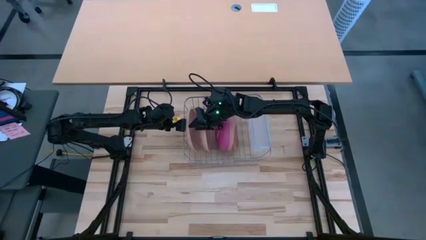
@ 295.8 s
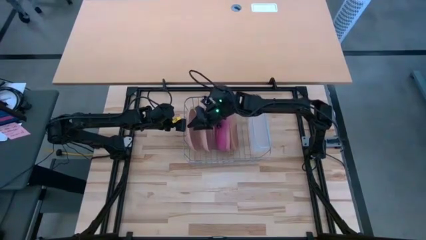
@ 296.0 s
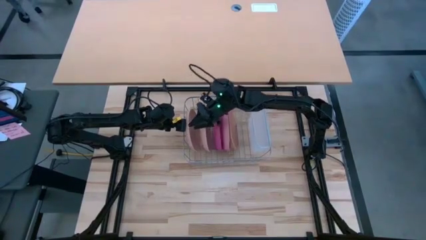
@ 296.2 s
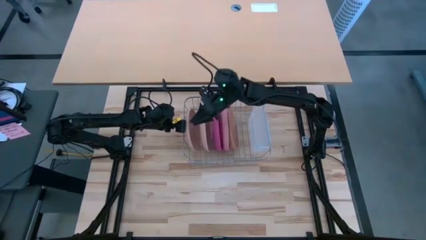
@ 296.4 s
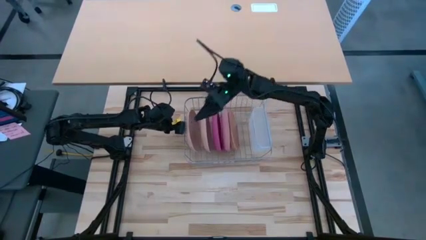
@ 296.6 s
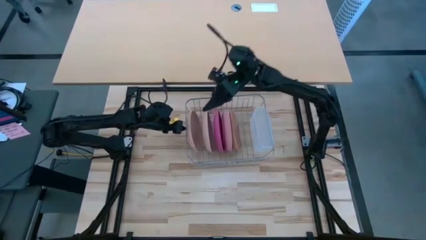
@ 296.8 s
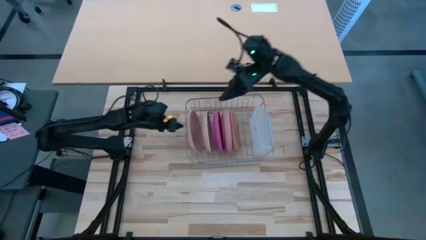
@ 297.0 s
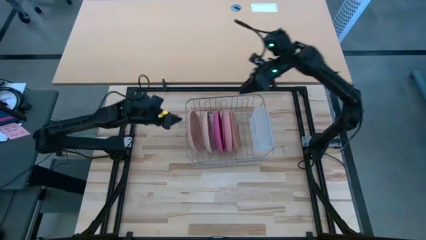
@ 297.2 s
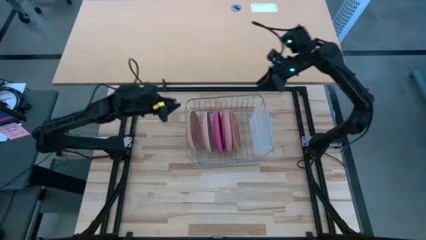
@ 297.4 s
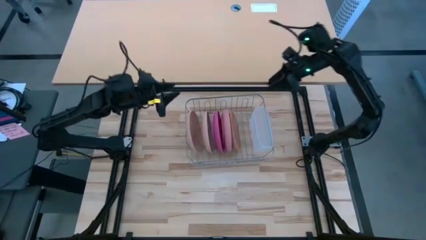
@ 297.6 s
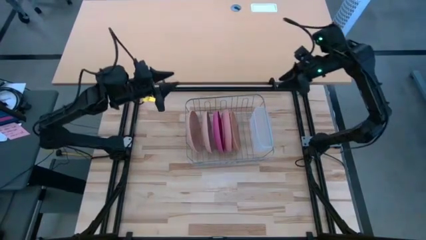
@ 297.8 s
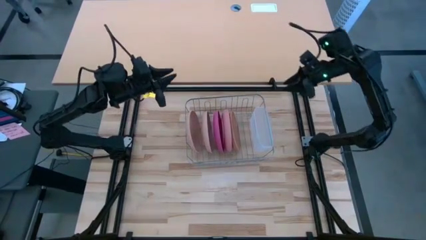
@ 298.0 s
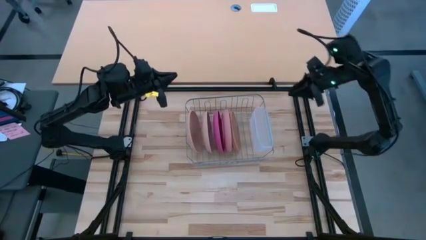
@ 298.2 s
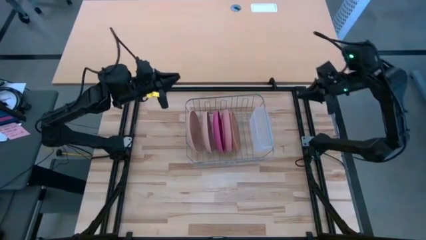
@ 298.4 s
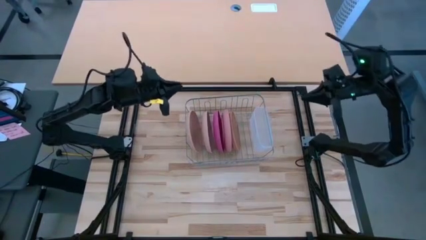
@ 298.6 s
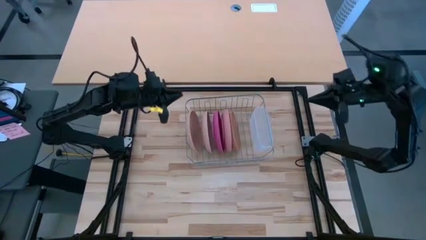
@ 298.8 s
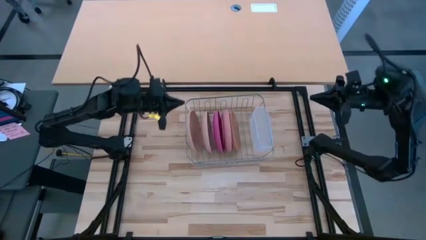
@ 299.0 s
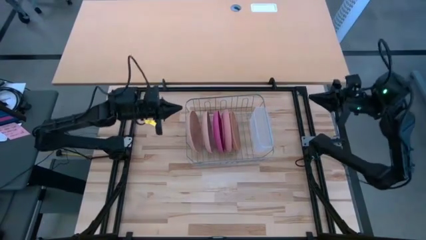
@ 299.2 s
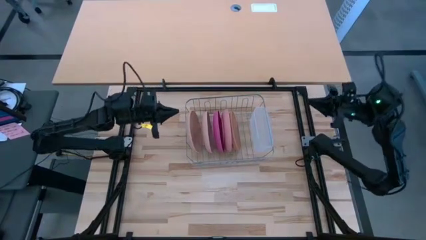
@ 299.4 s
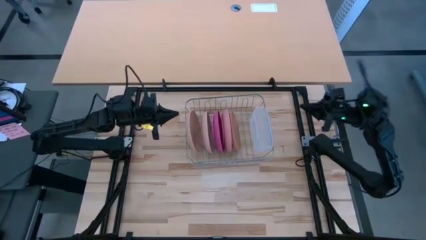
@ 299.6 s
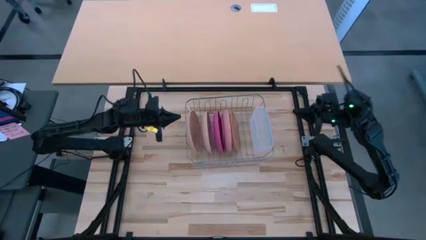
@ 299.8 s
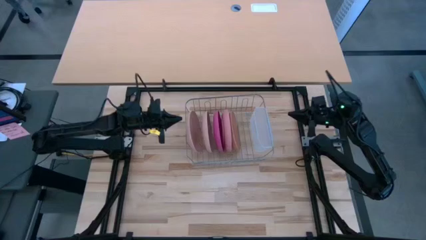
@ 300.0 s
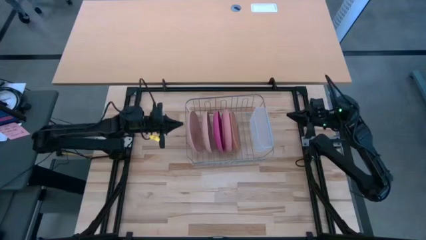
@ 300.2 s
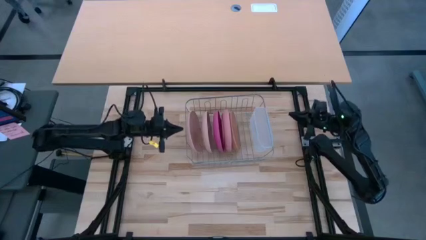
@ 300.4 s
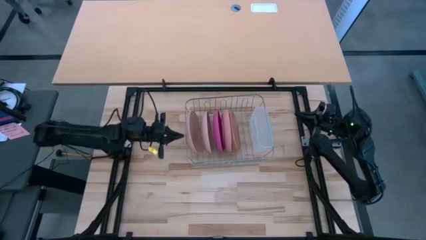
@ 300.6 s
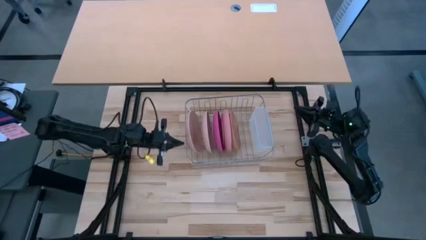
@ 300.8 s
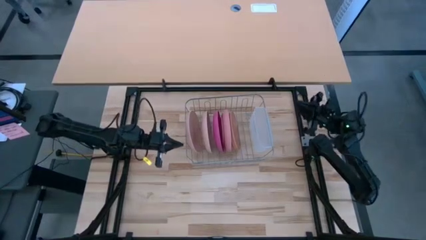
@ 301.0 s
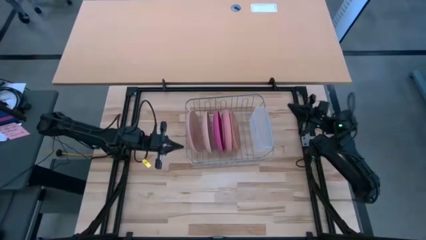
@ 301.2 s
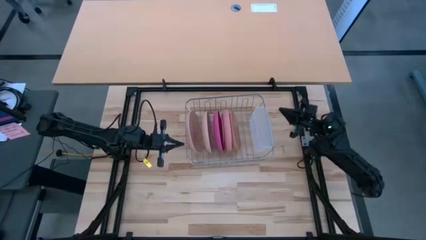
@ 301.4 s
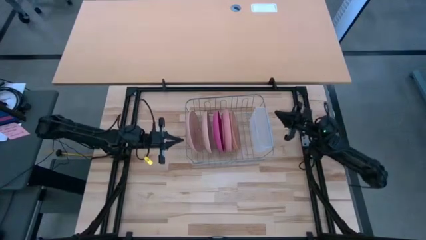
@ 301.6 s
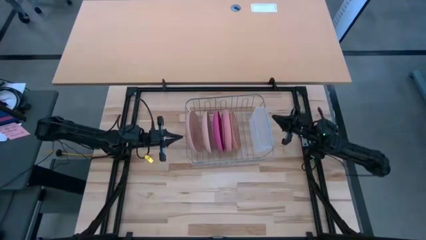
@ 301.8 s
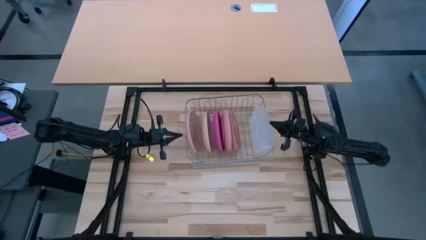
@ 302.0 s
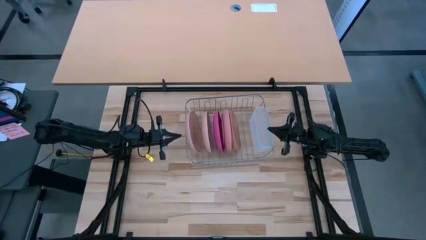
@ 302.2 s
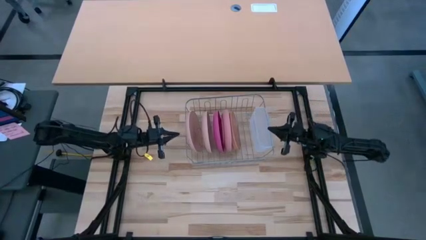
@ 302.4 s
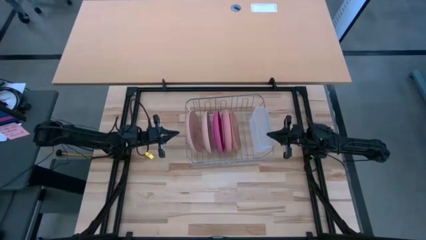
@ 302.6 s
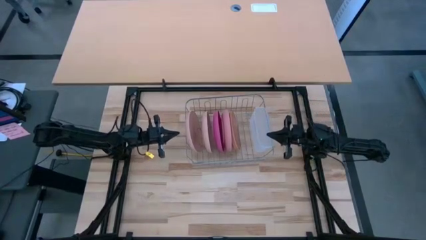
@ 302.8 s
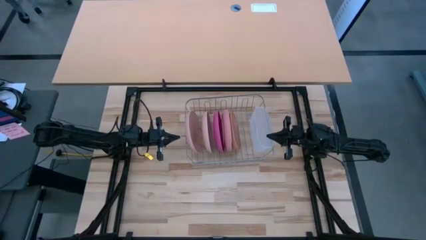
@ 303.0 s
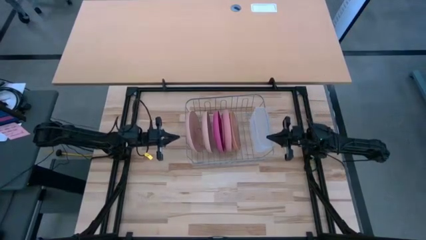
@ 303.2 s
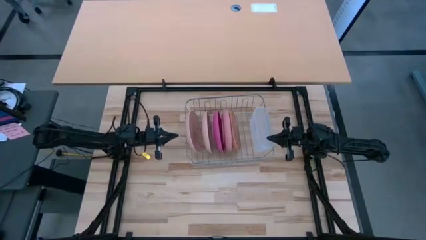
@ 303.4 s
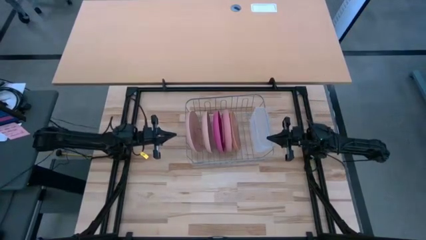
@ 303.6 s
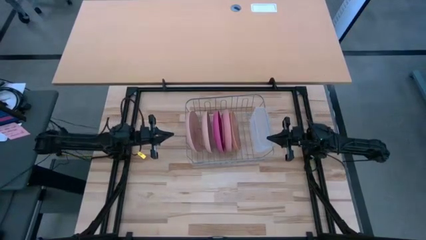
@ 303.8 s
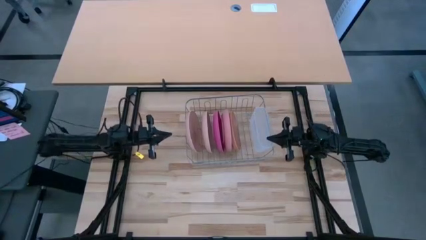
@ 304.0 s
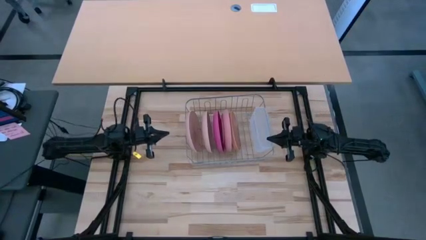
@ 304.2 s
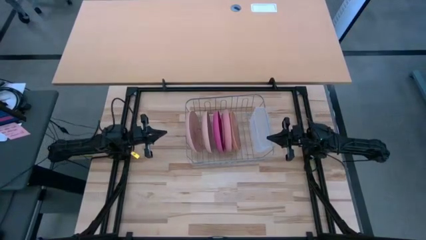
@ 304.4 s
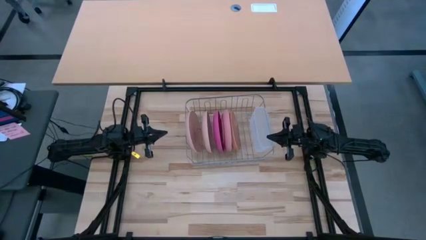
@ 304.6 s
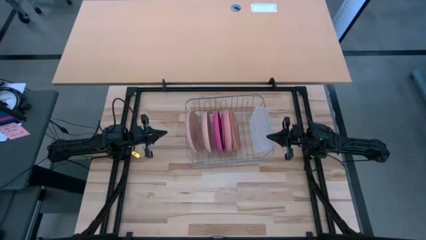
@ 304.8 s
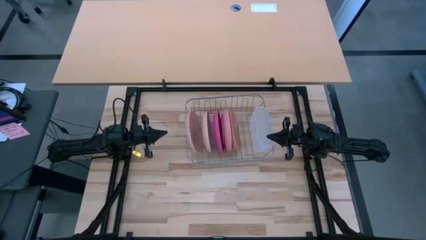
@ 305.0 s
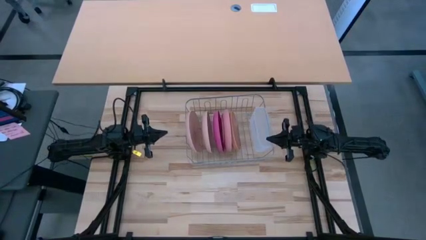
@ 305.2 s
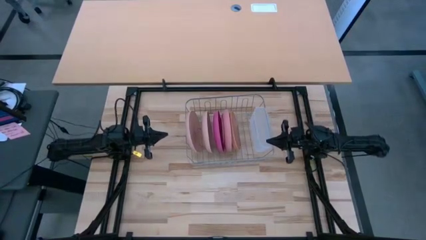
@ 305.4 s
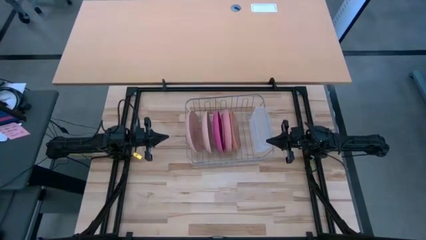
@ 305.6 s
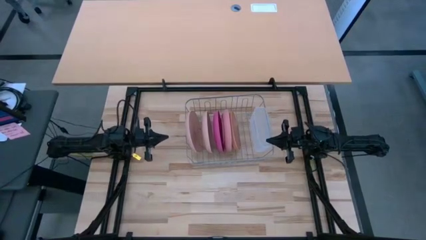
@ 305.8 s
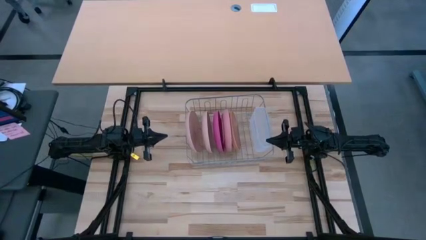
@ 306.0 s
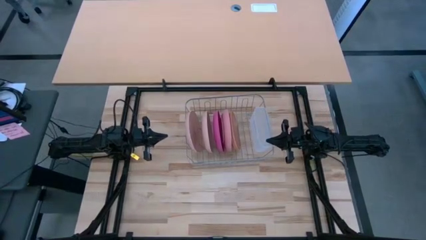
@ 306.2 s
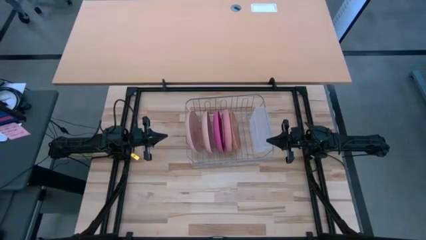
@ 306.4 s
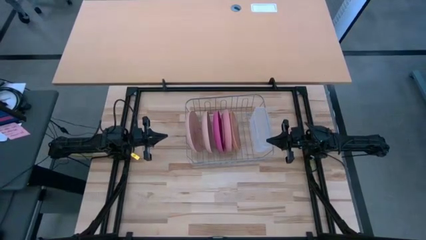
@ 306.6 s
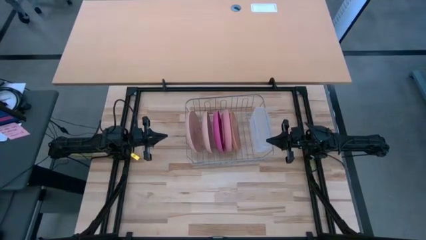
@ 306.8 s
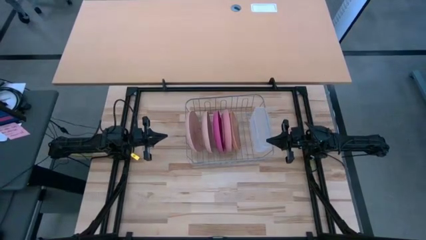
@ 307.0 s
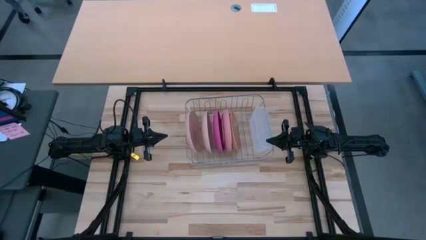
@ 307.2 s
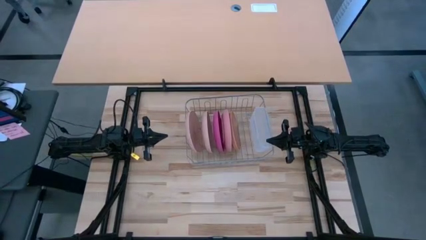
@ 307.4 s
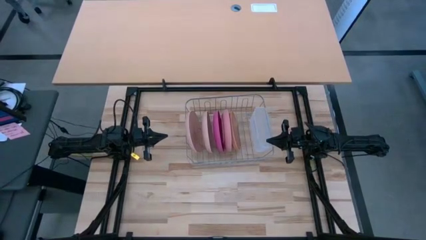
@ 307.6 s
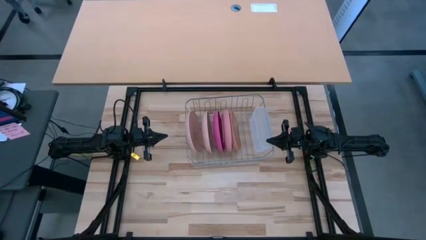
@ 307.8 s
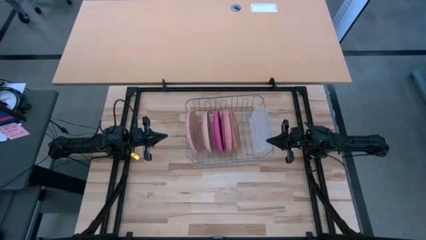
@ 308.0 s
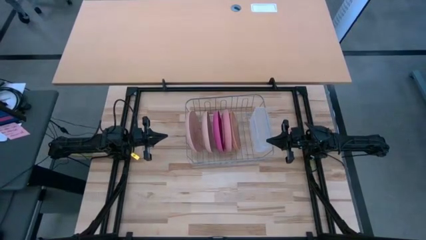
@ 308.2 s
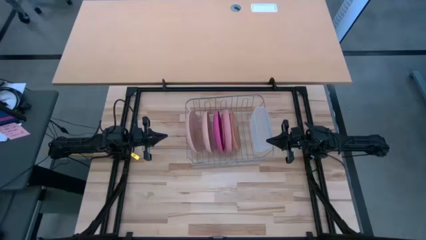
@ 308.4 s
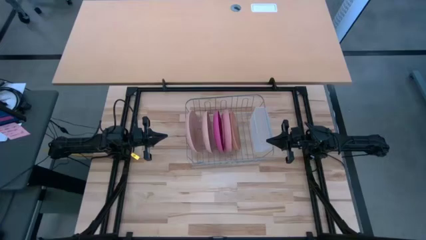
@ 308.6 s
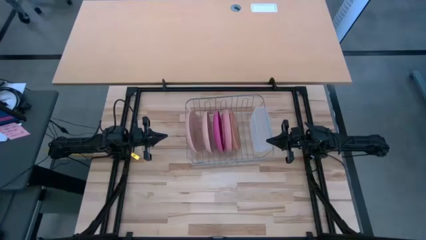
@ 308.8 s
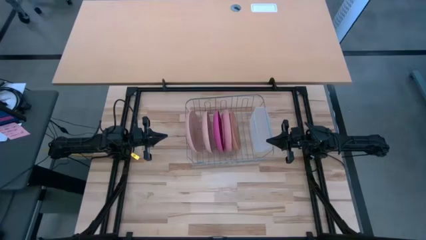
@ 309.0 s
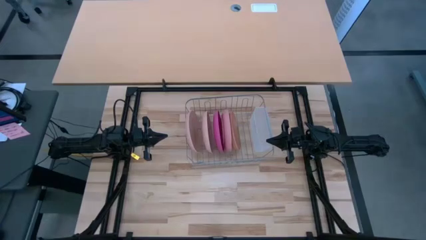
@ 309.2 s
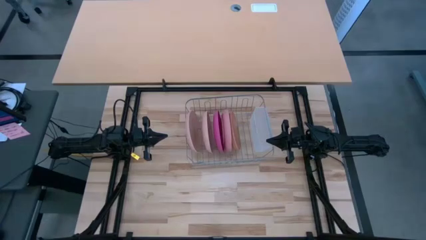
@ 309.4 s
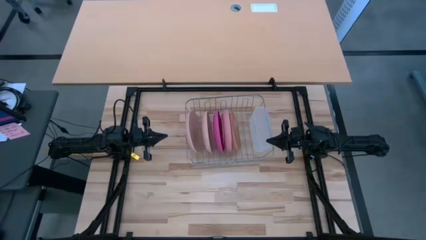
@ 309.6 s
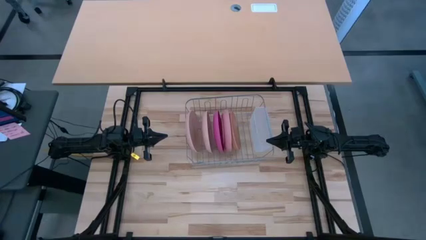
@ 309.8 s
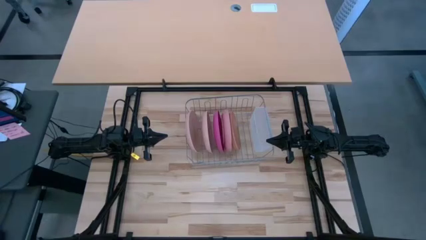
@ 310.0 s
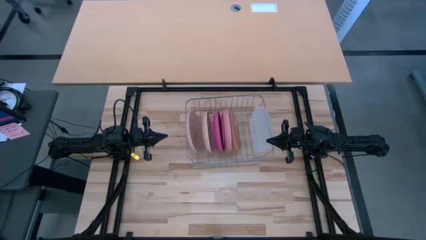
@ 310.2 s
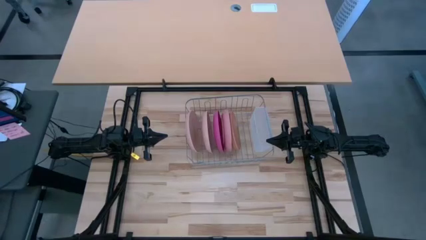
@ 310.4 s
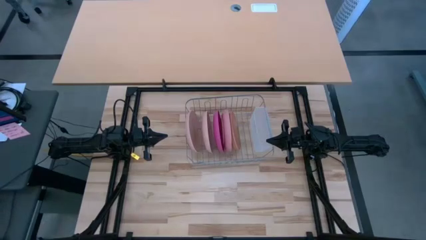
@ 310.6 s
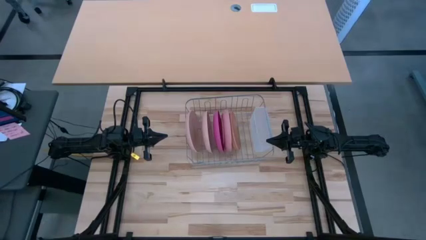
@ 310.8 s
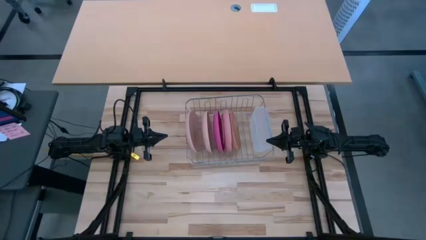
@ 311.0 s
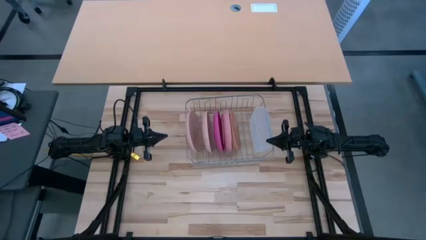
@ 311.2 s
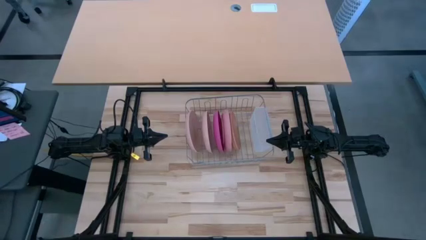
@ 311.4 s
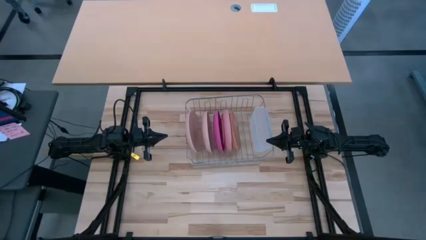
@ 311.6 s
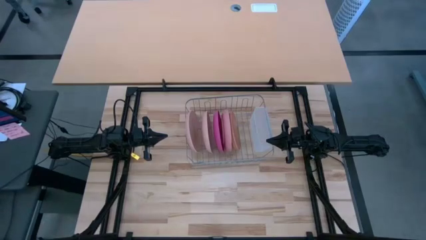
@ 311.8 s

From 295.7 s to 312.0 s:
Task: Sort dishes
Return to Home Position
